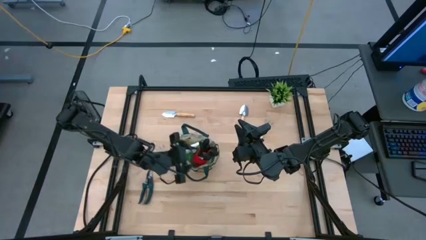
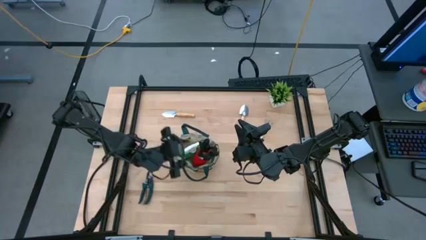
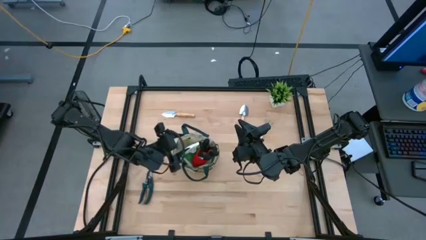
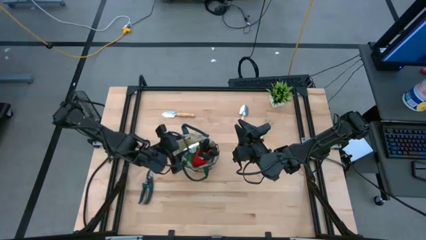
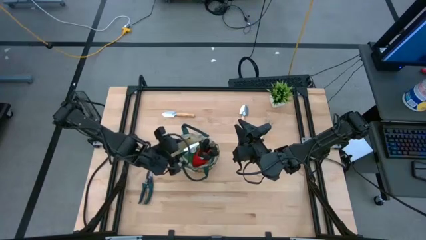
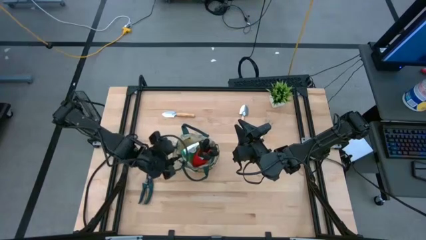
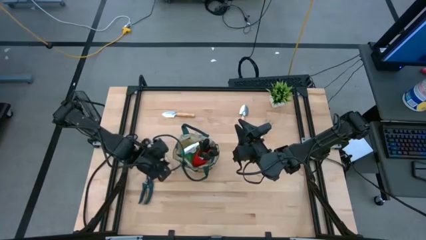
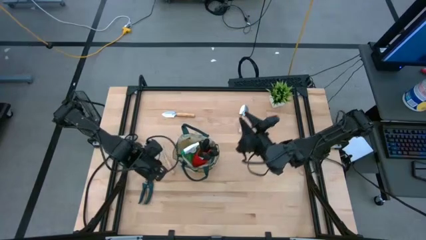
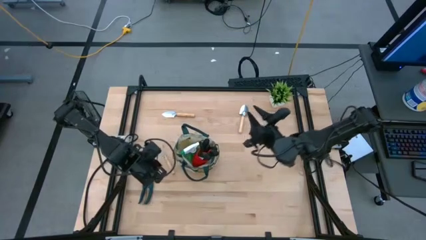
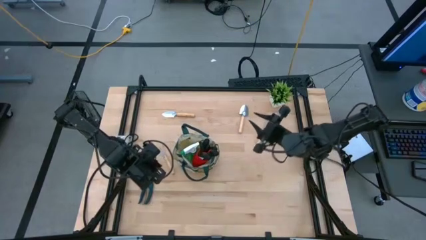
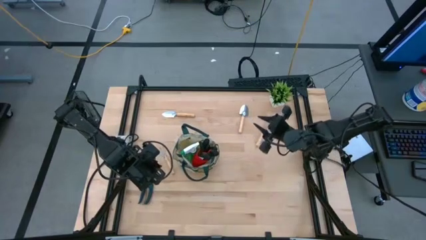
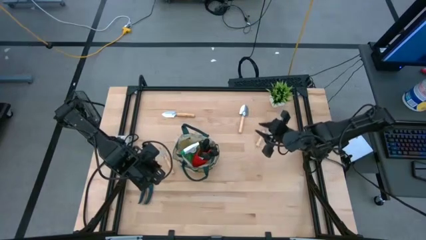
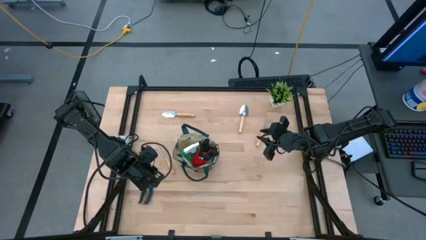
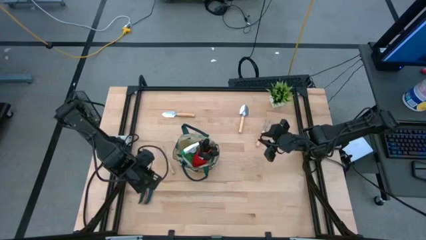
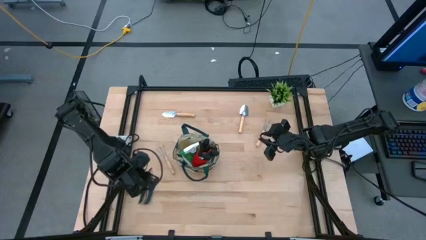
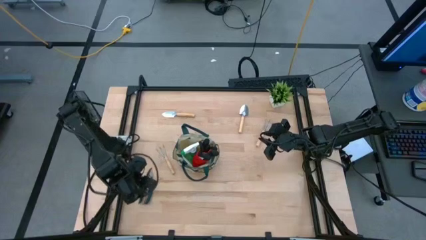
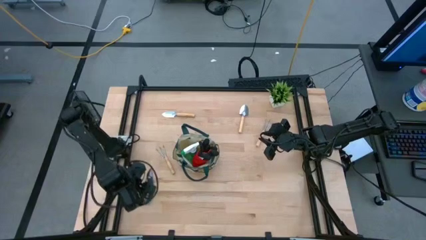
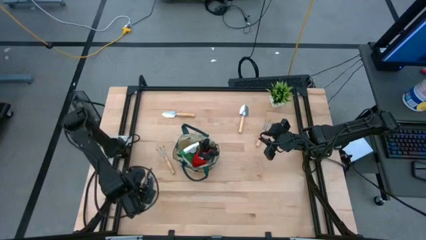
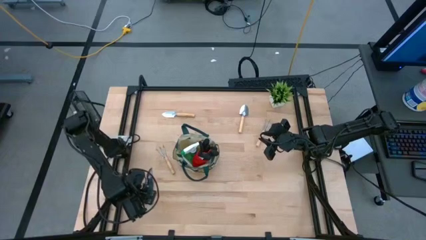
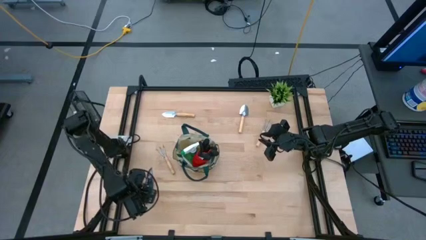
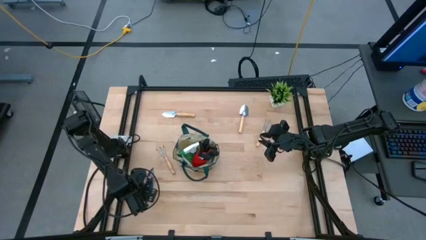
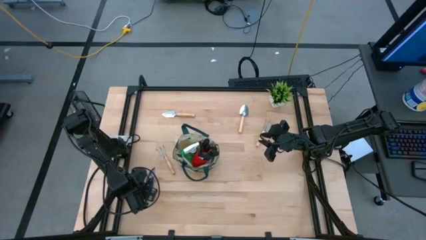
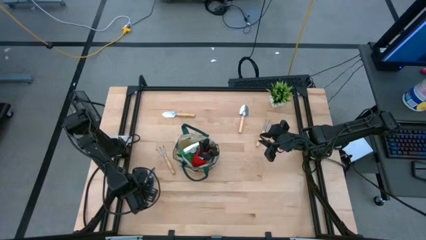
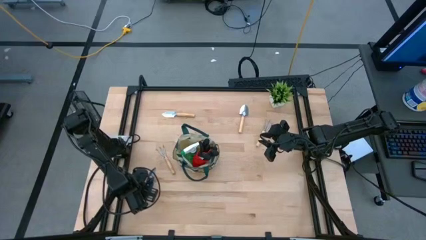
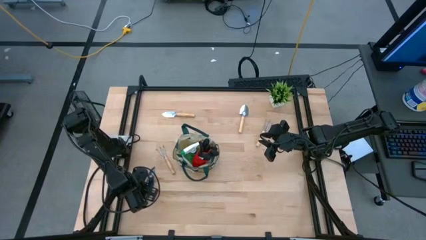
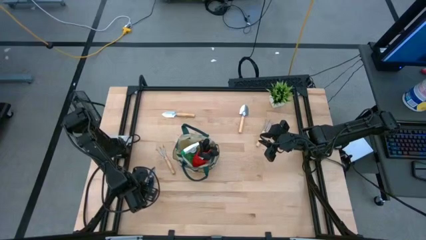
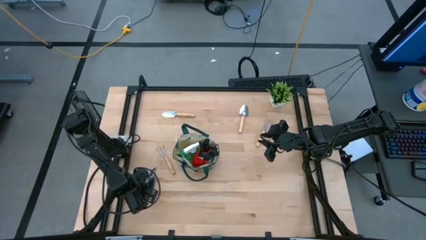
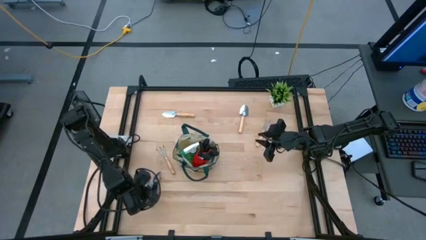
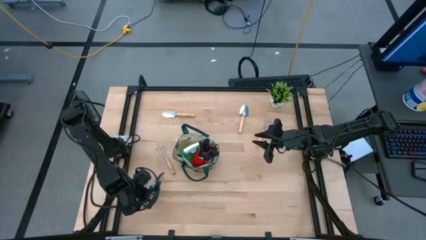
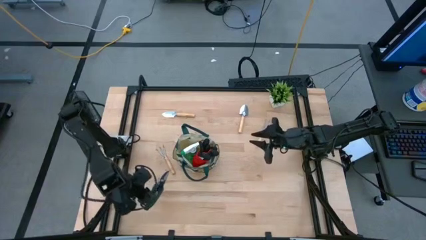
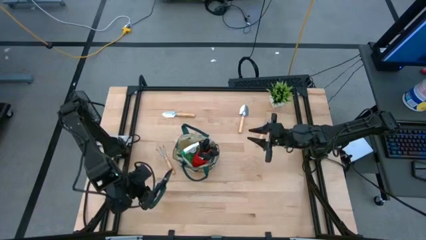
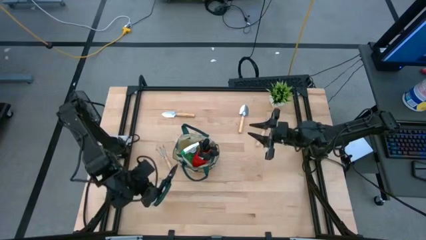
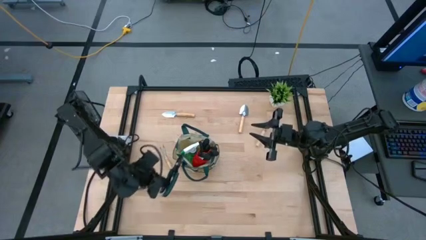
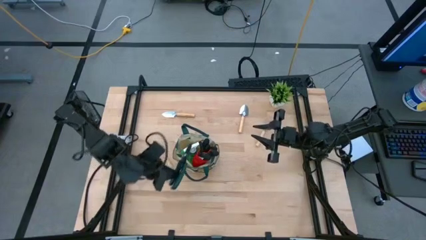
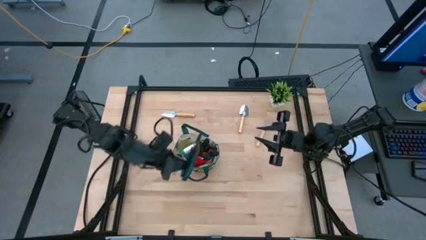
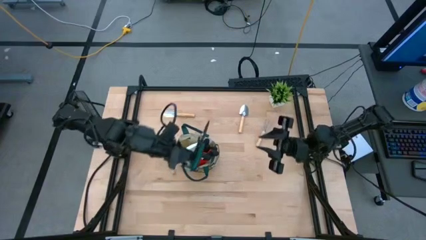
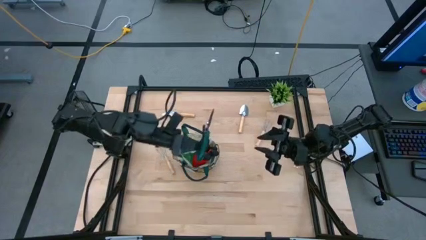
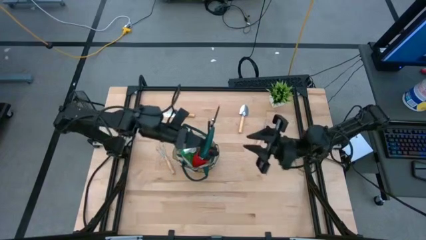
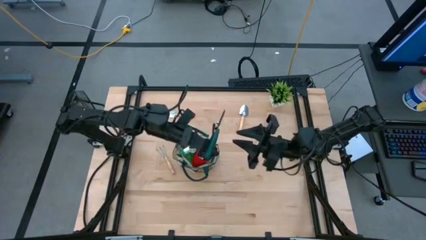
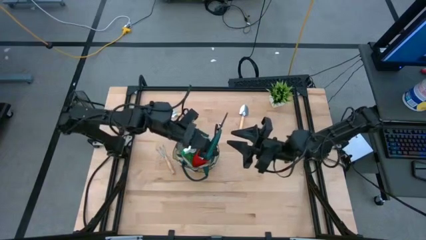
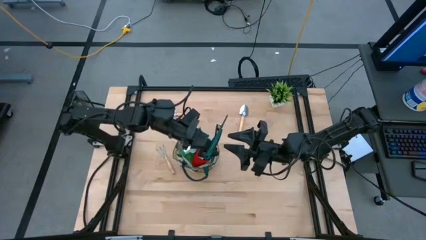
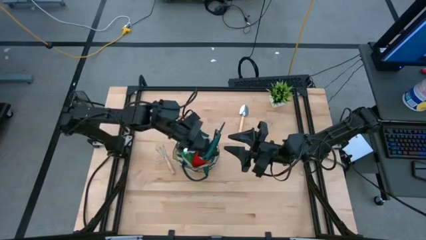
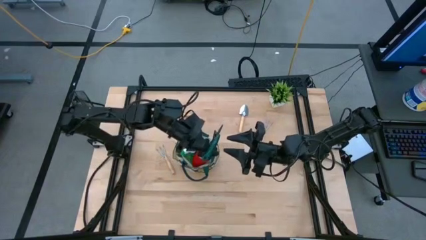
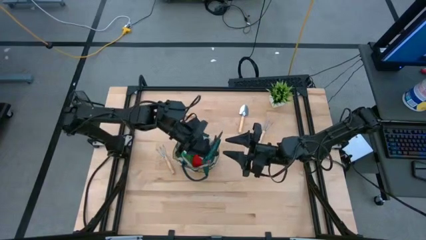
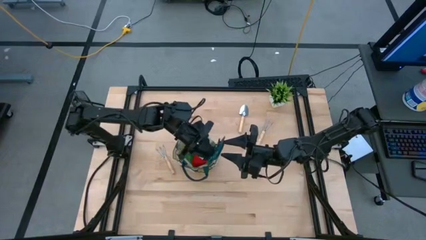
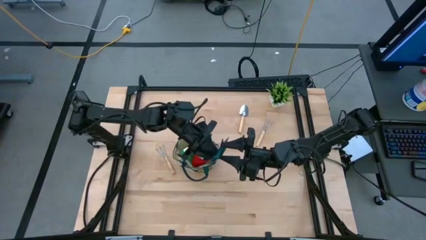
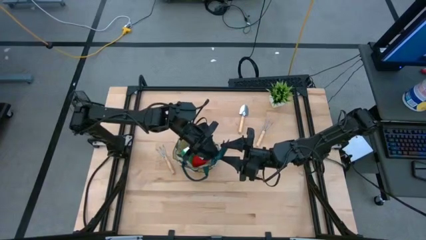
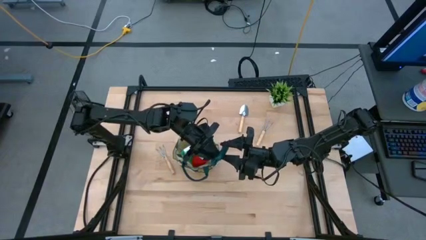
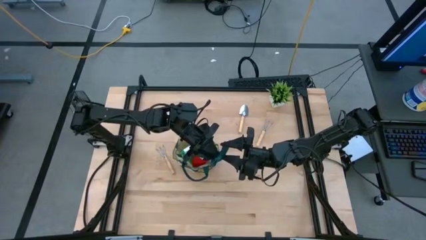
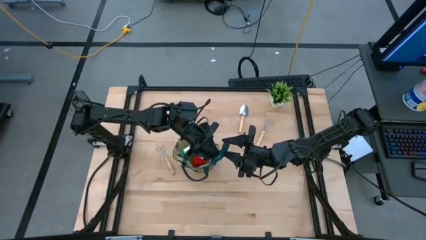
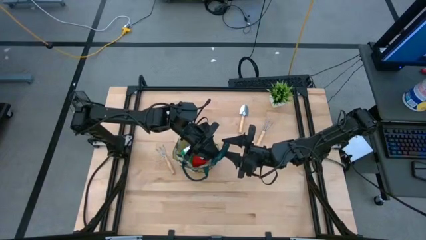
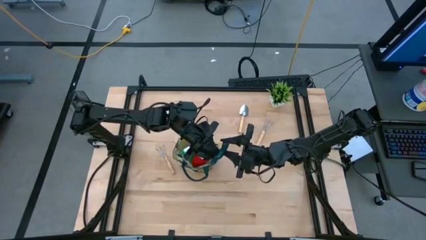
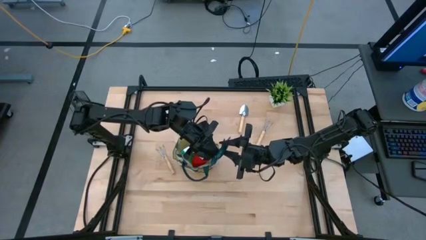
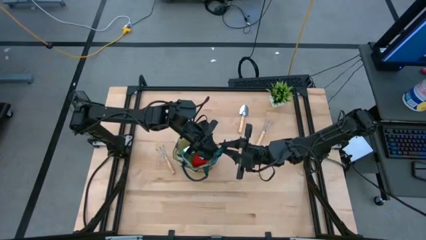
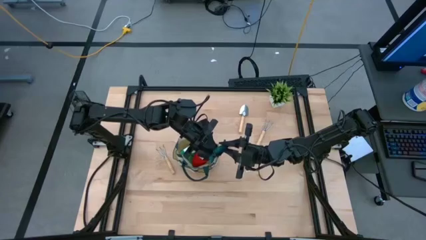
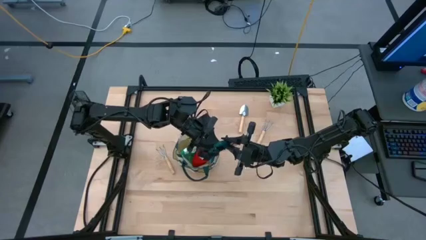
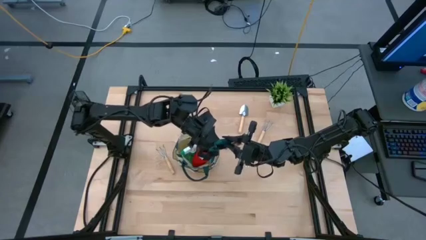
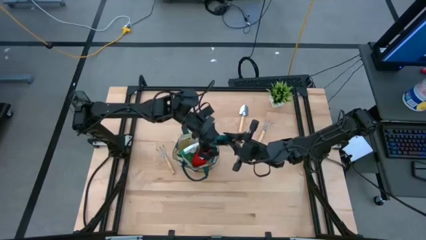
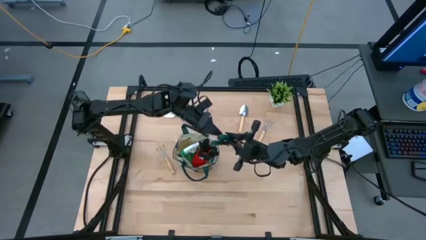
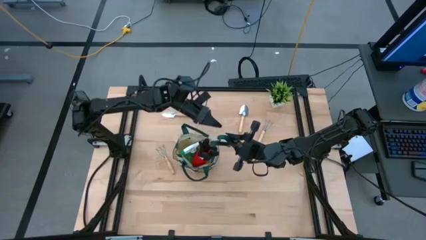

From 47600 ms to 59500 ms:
Task: Pick & Place Garden tools in Gardening bag
Put the green shear scissors into the brown gardening bag
